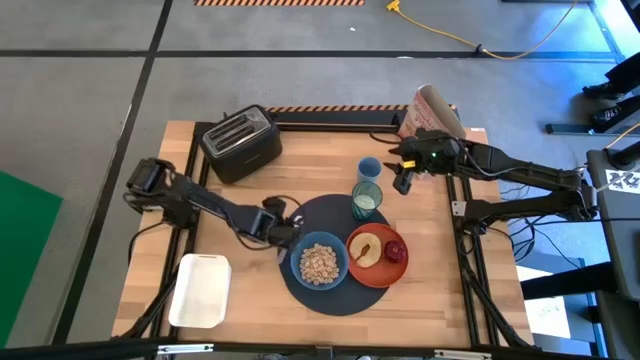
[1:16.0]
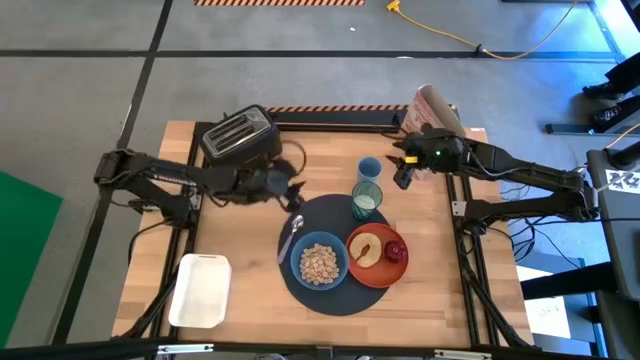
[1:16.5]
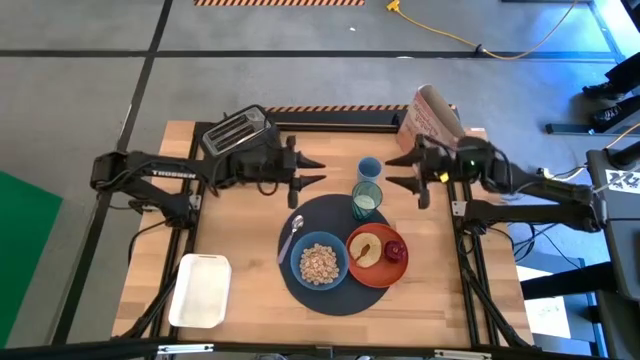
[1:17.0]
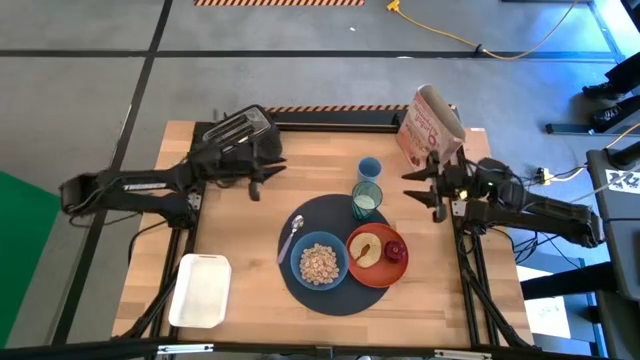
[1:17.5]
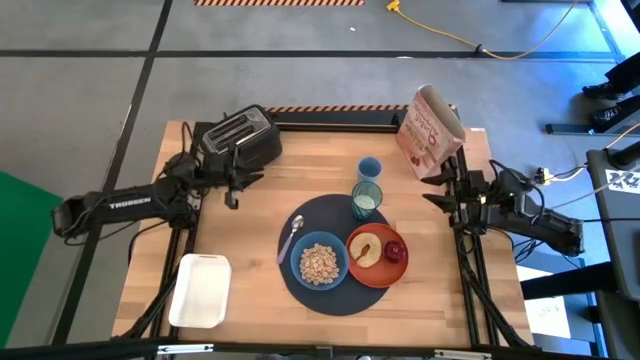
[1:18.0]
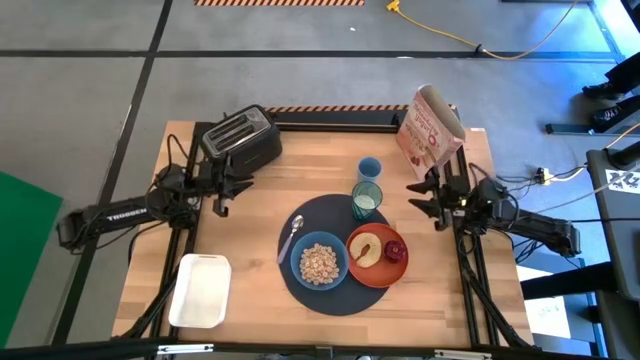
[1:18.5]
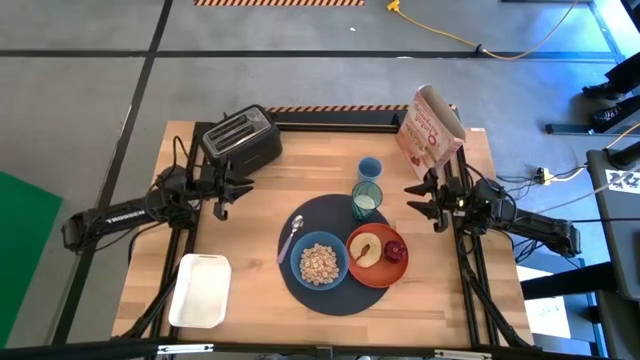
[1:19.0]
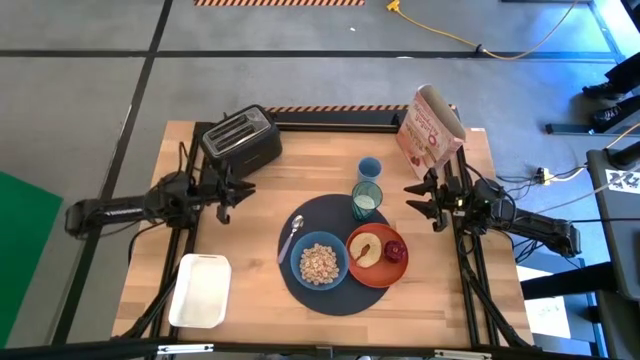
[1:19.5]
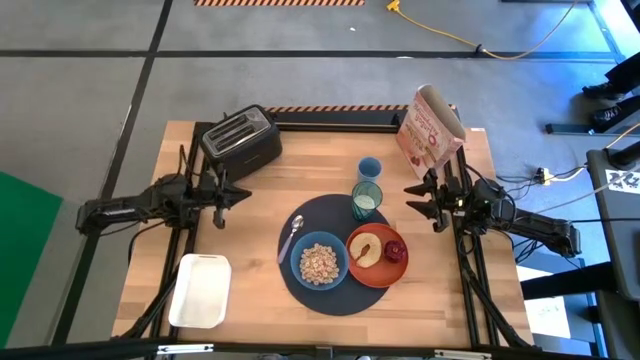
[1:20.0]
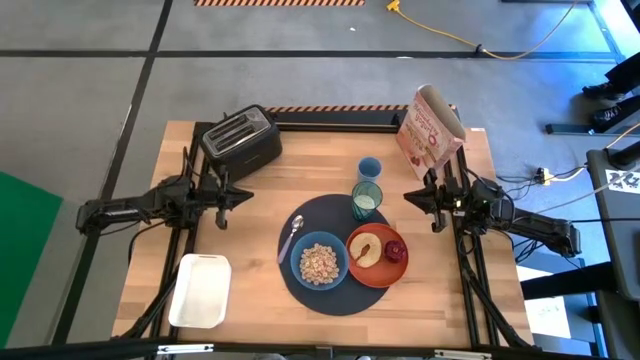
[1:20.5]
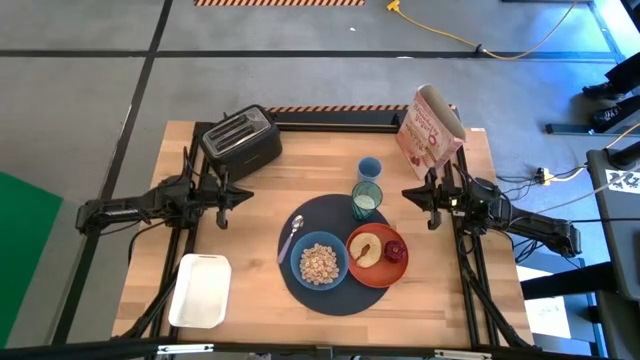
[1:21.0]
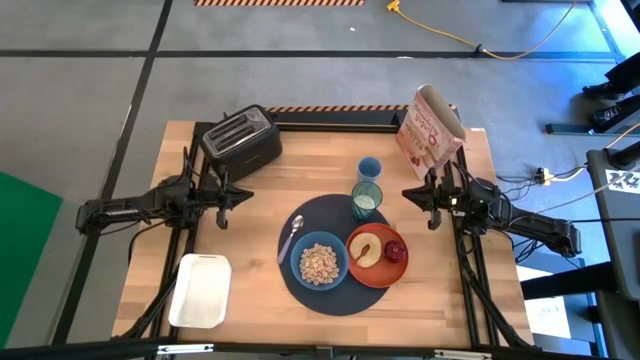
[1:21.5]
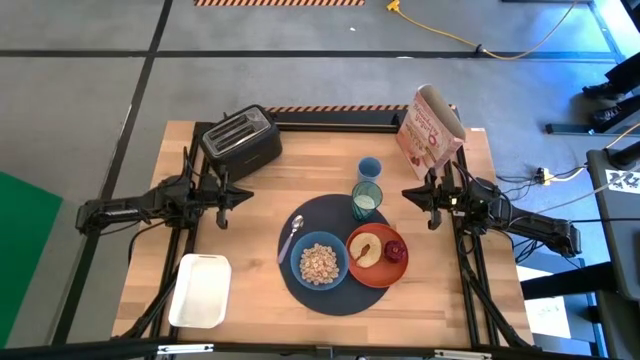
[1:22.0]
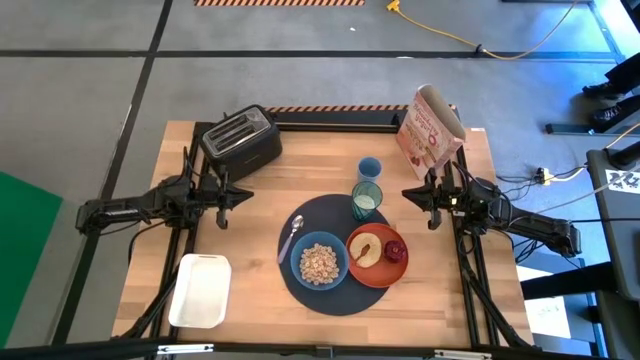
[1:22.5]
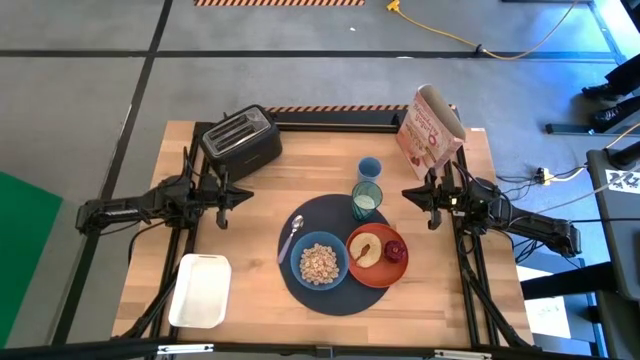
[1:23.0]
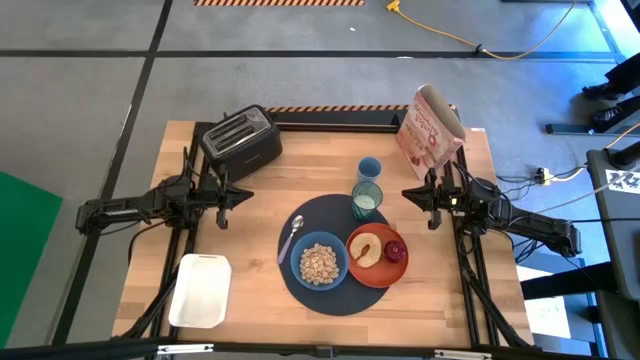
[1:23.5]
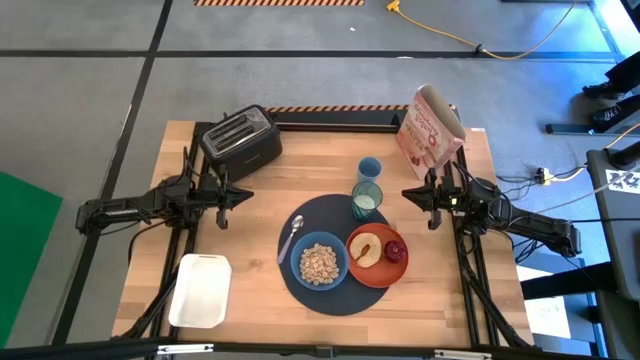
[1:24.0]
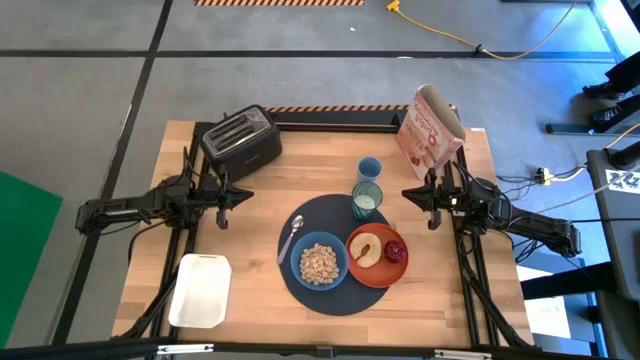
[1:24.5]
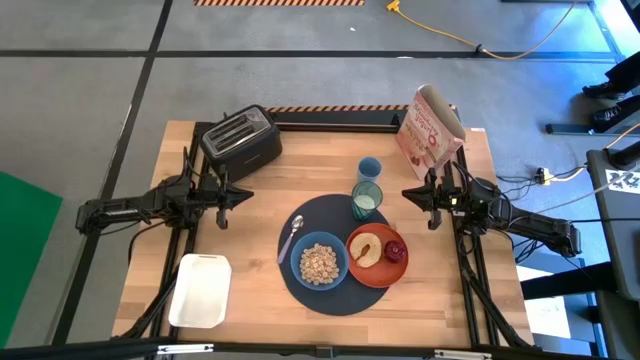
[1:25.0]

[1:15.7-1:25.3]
Task: Arrange a breakfast setting
Return to Home Position

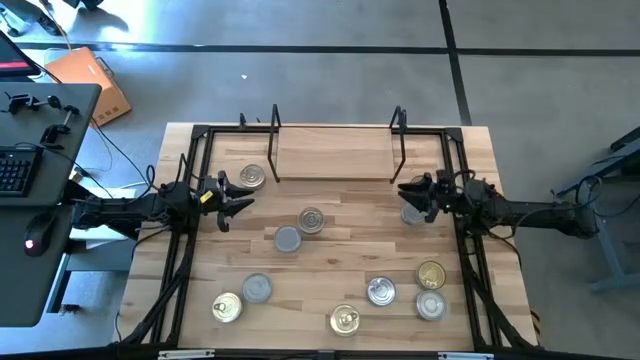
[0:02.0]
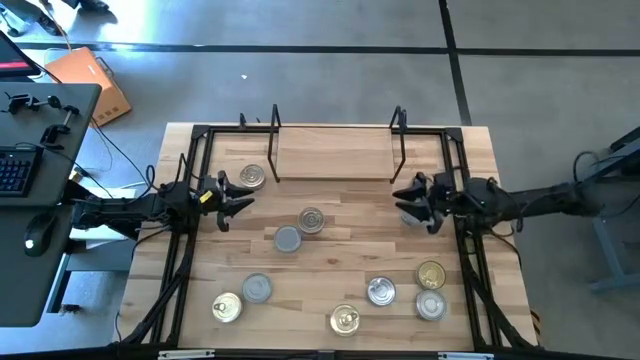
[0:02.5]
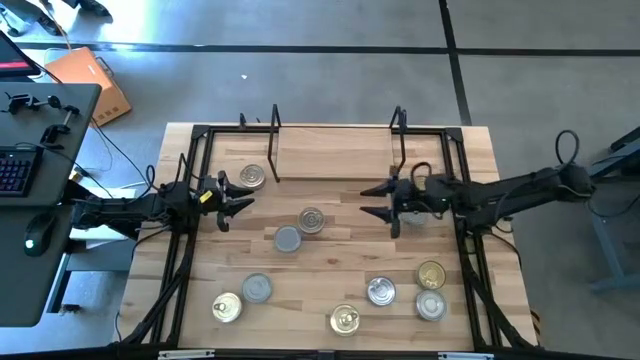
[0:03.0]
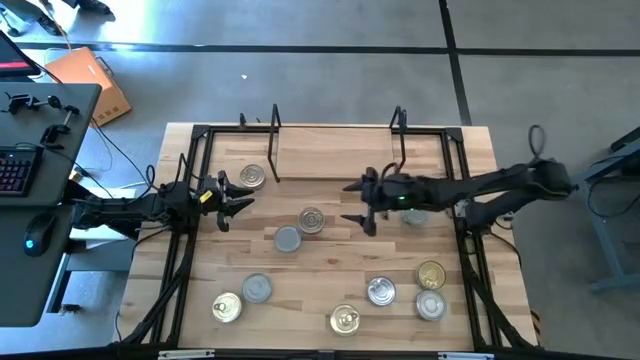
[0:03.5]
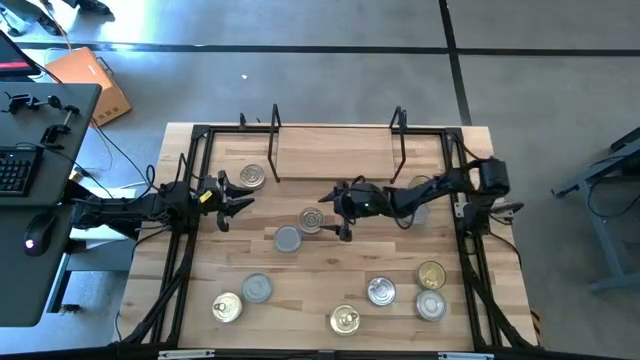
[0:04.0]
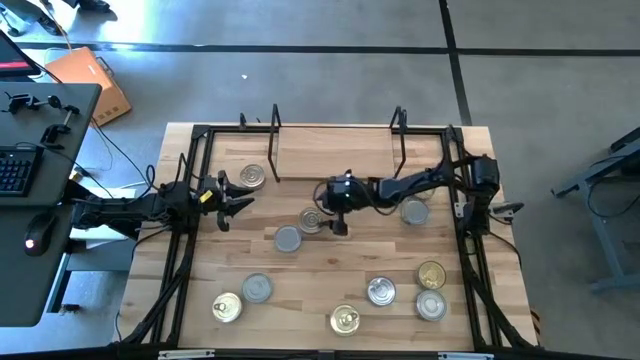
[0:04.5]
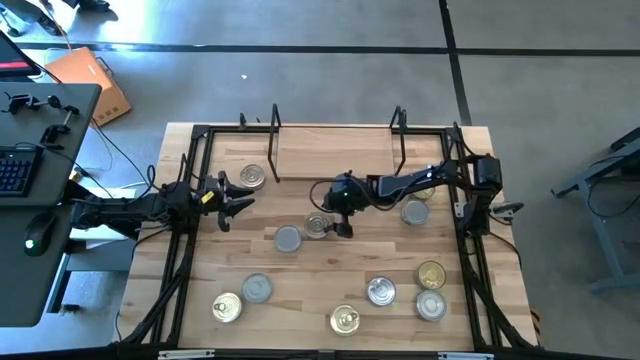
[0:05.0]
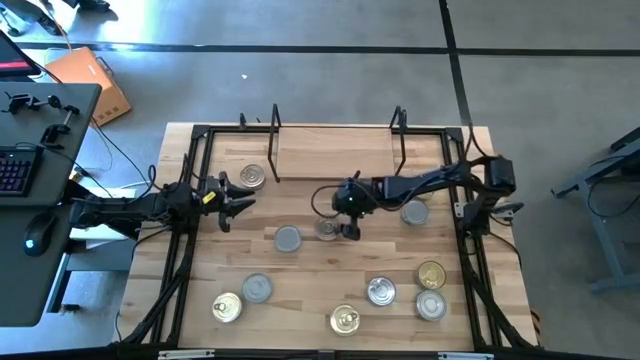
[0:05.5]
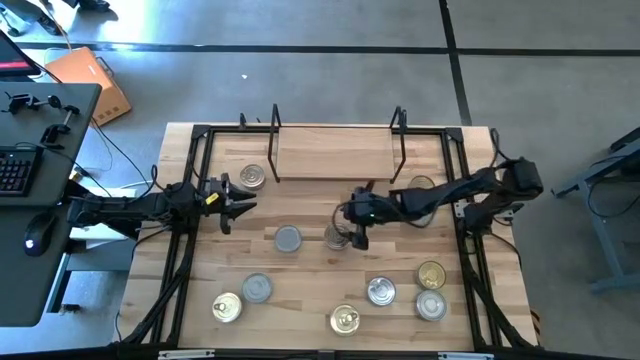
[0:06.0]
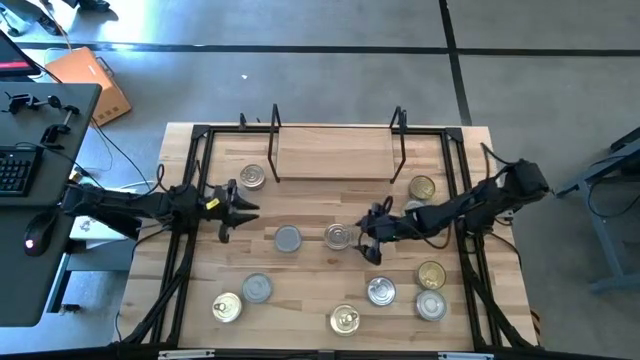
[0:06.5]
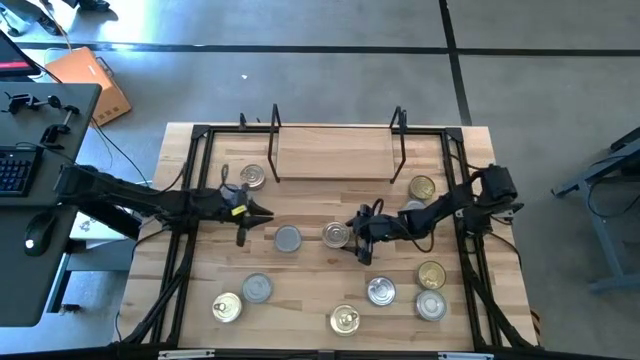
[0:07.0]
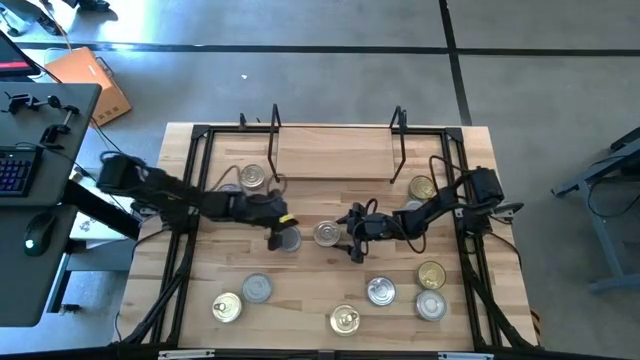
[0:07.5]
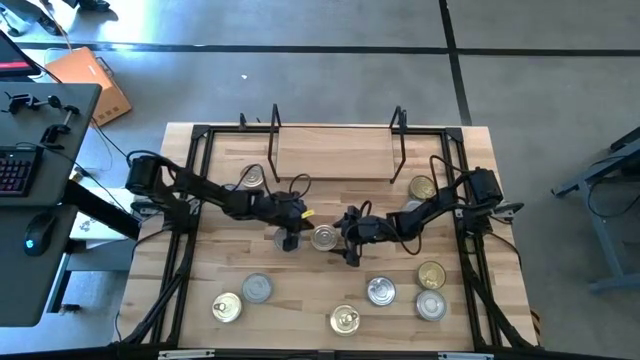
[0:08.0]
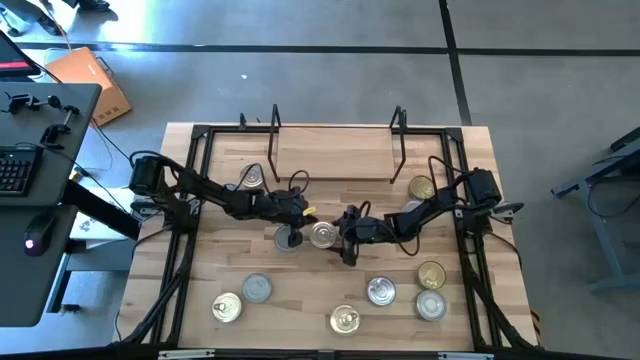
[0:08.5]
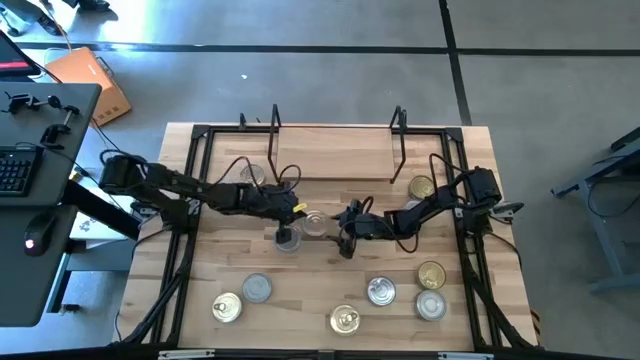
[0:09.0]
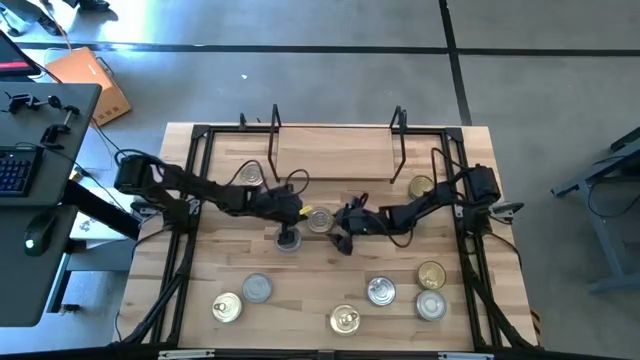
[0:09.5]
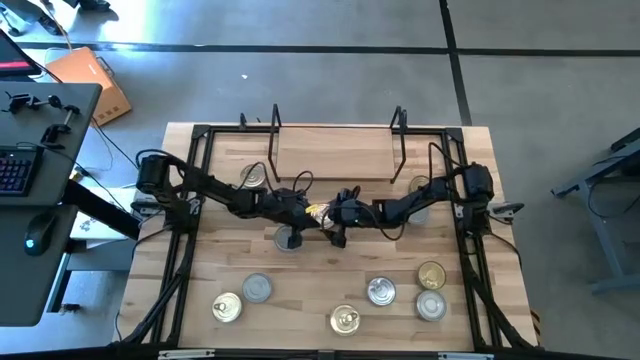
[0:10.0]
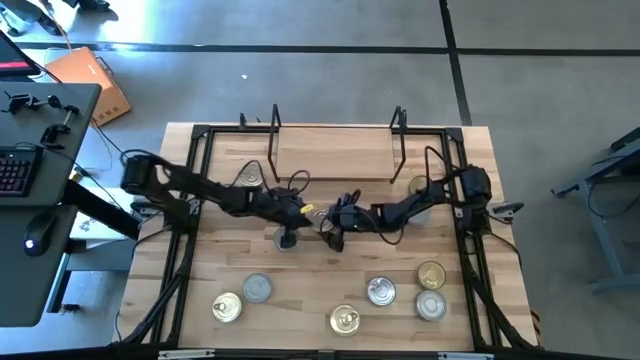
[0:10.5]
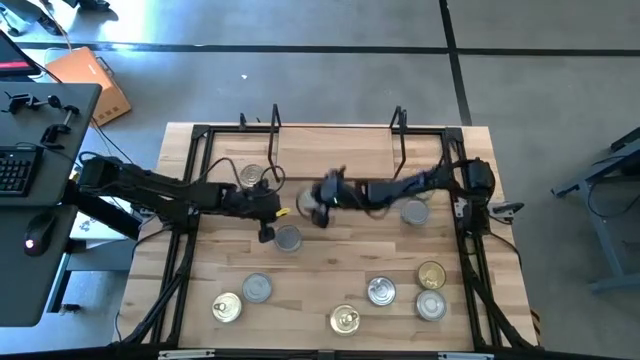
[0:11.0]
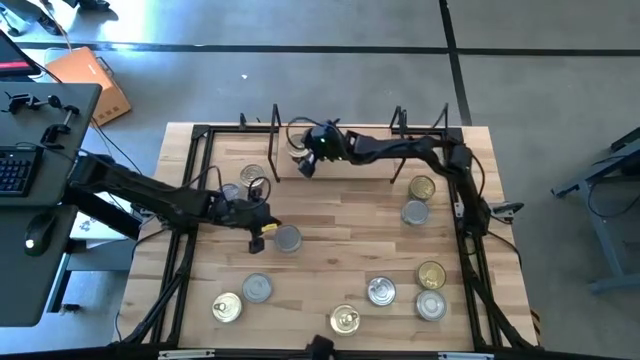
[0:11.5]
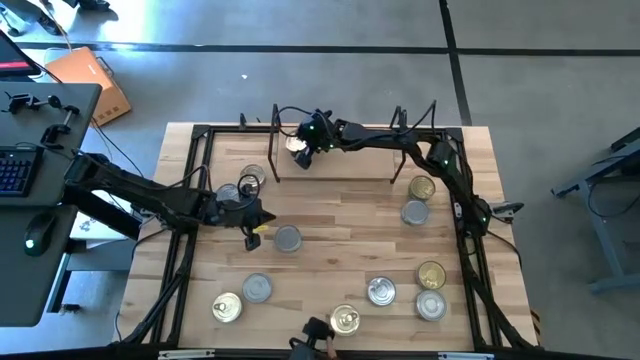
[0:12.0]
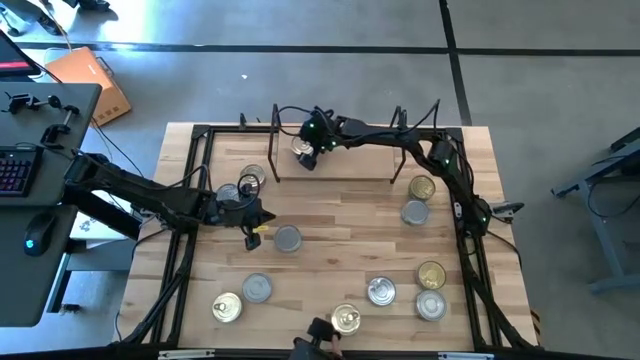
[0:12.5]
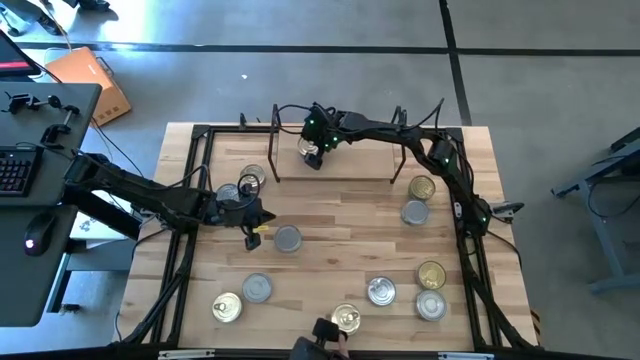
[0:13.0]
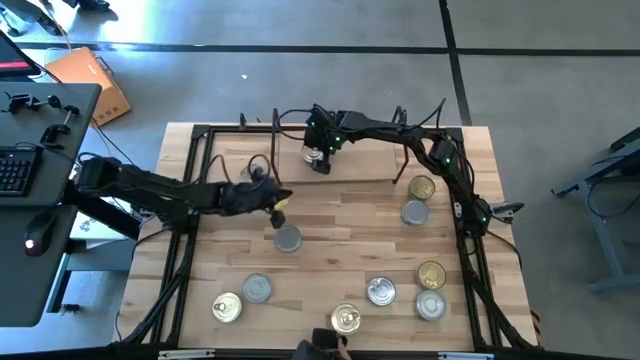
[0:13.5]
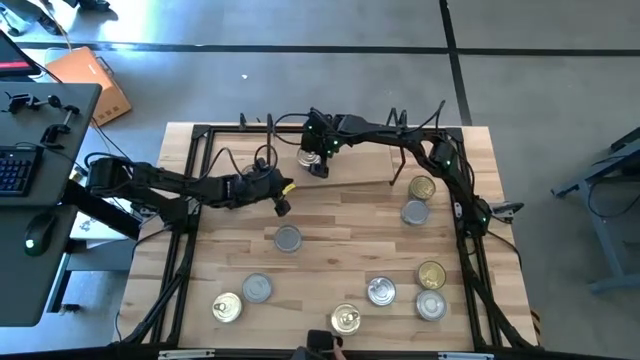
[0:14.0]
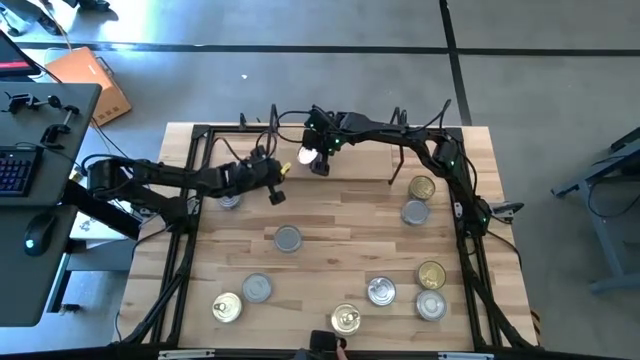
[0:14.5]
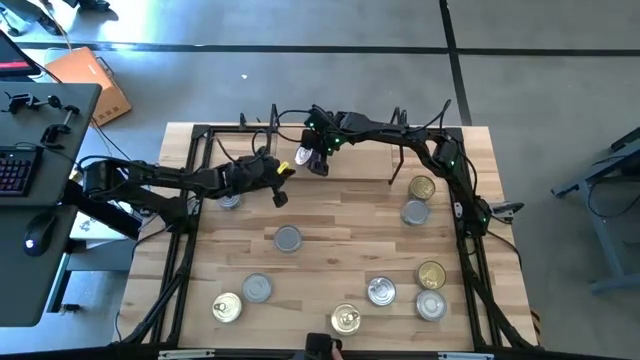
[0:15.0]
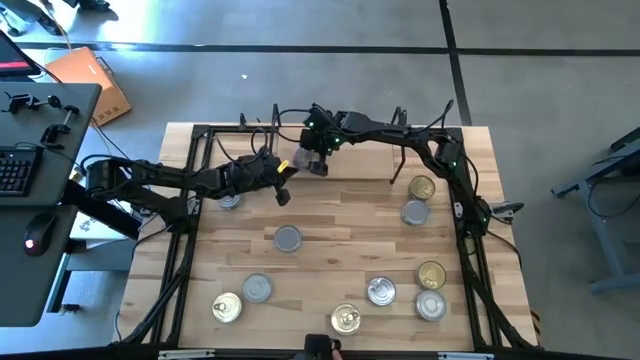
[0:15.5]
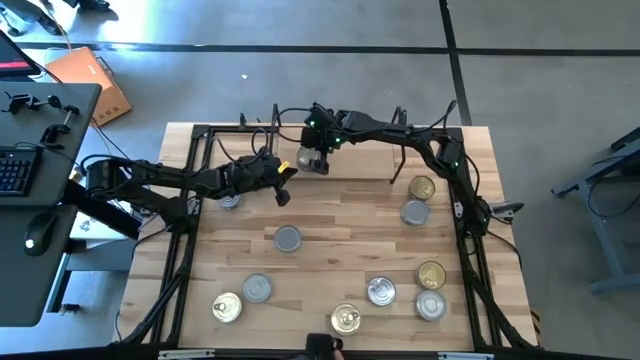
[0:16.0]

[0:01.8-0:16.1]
Task: Stack canned seafood by type on shelf
Put the blue-pink tuna can on the shelf
